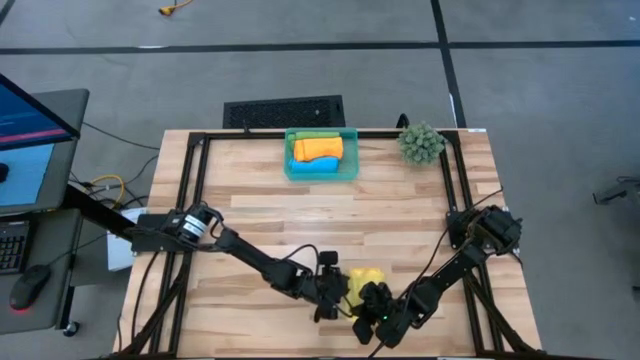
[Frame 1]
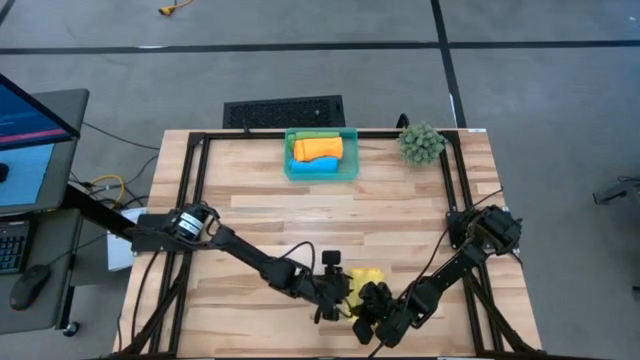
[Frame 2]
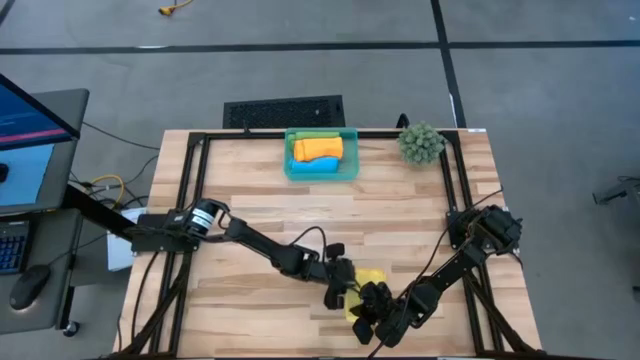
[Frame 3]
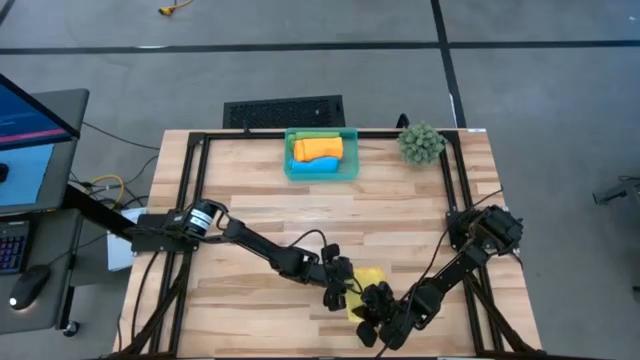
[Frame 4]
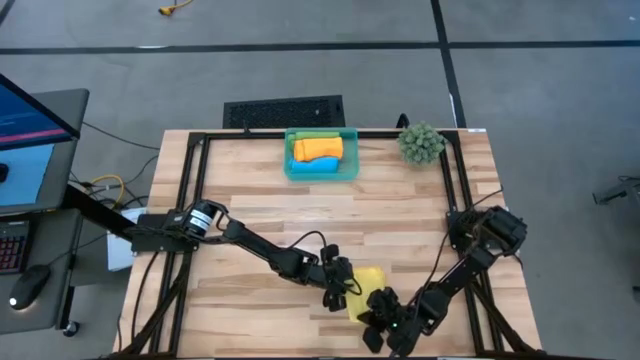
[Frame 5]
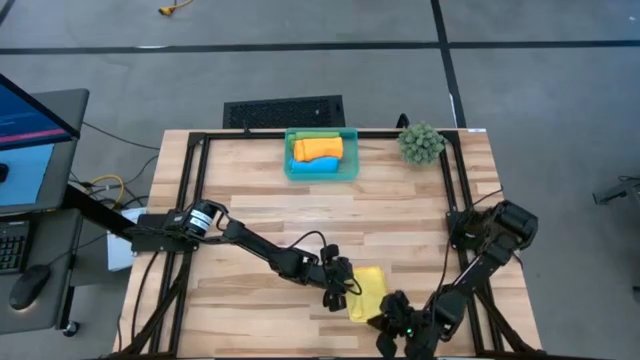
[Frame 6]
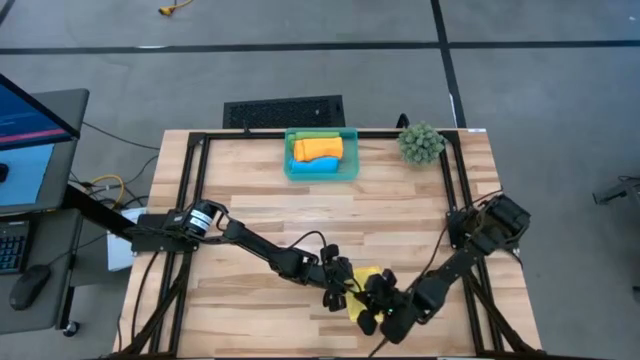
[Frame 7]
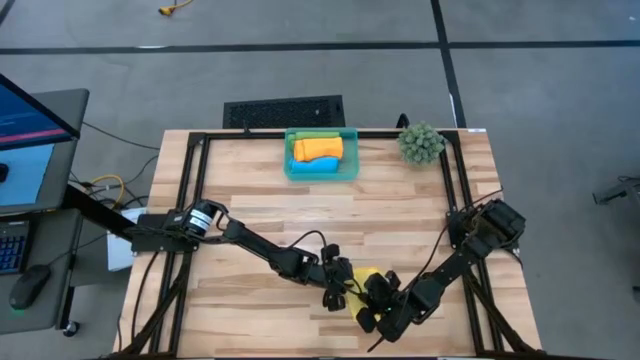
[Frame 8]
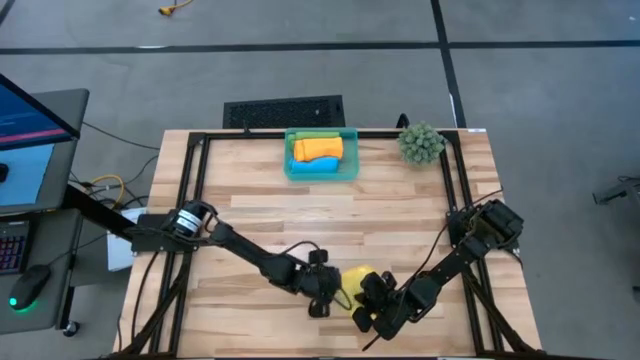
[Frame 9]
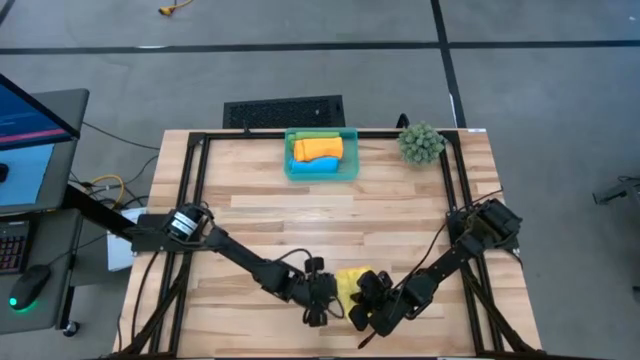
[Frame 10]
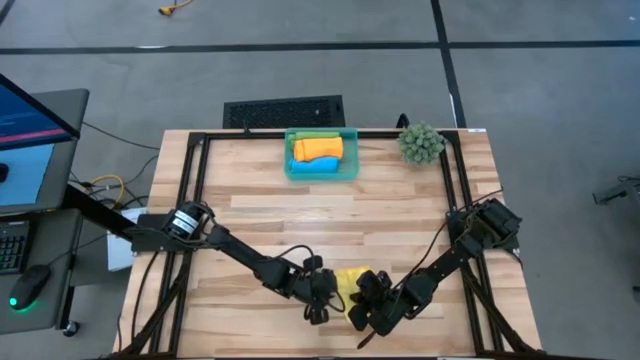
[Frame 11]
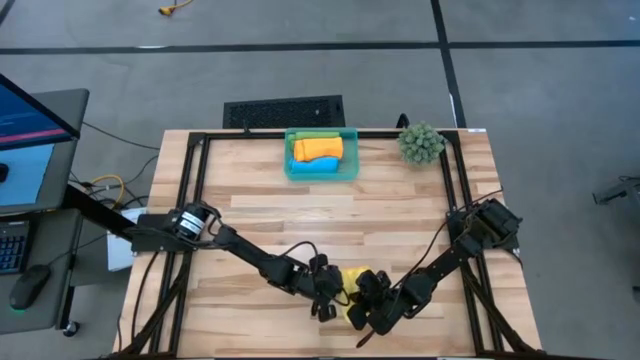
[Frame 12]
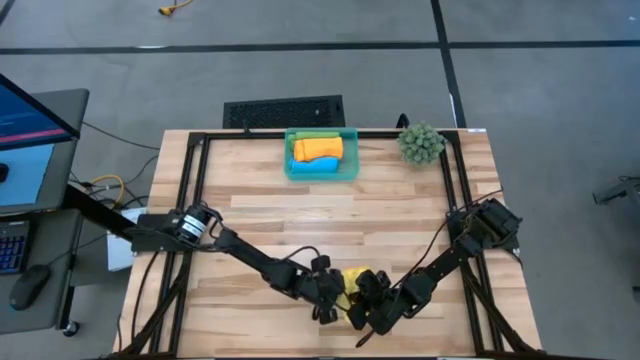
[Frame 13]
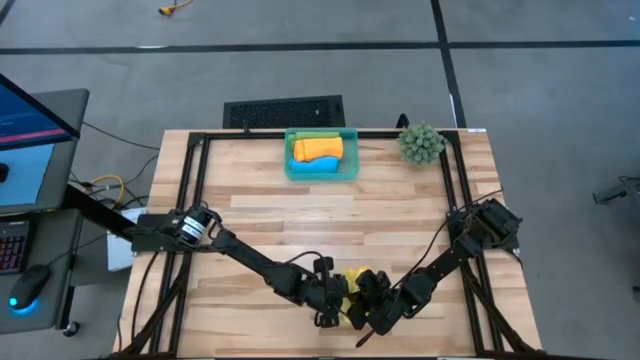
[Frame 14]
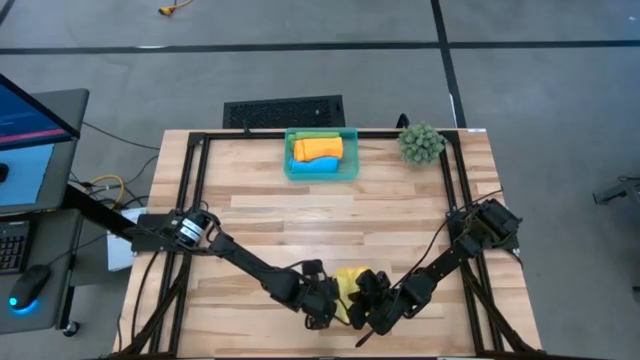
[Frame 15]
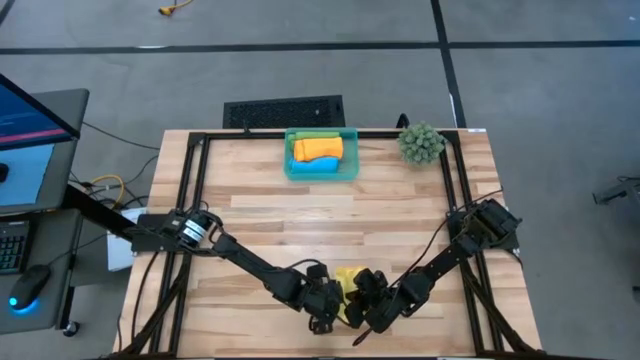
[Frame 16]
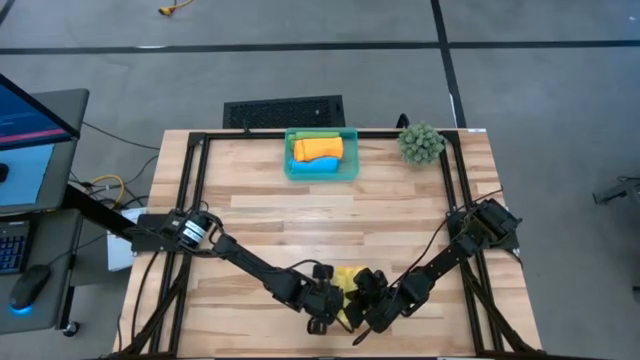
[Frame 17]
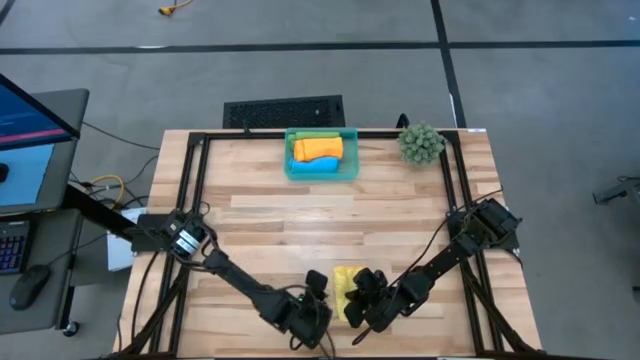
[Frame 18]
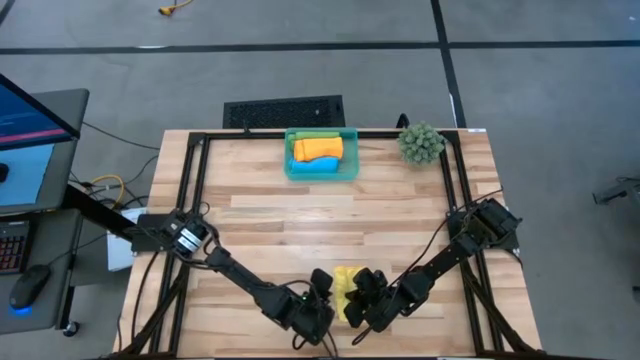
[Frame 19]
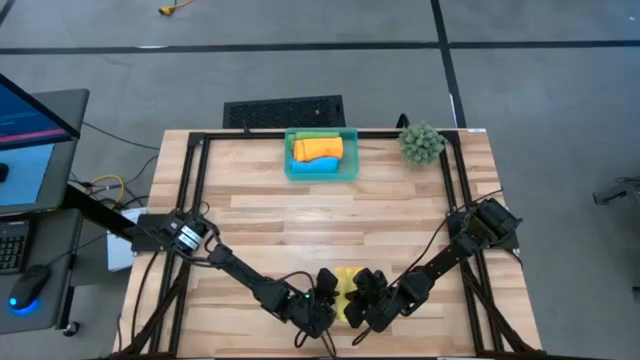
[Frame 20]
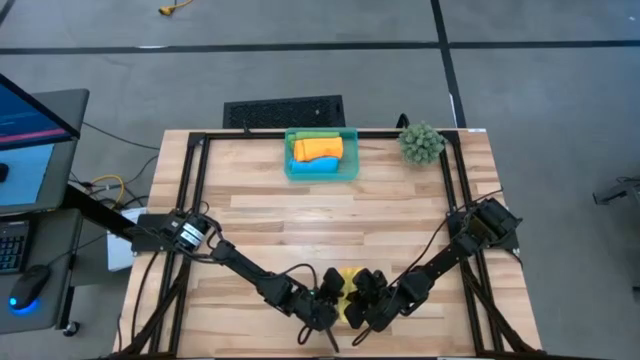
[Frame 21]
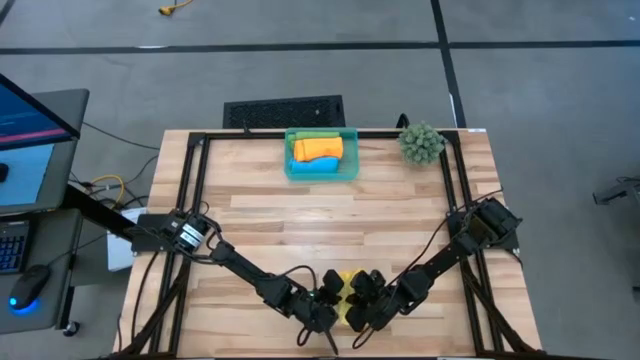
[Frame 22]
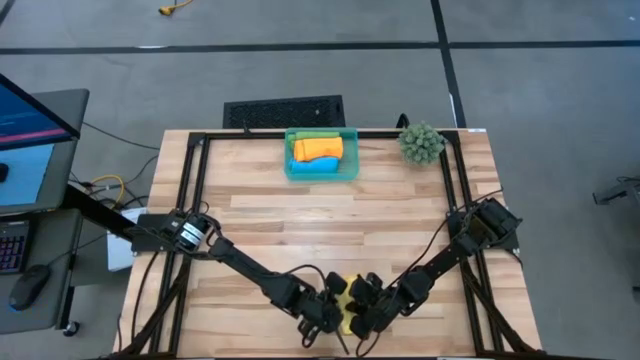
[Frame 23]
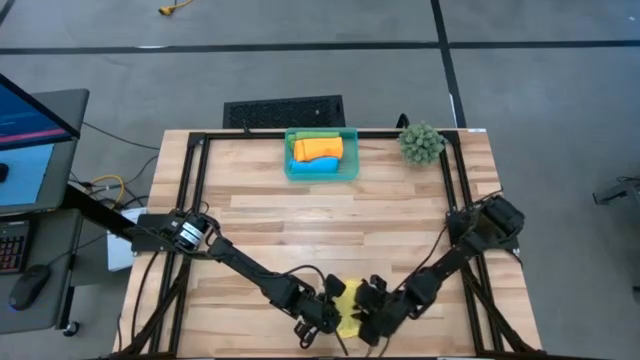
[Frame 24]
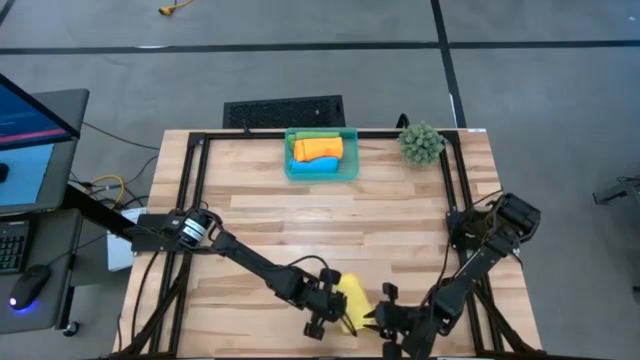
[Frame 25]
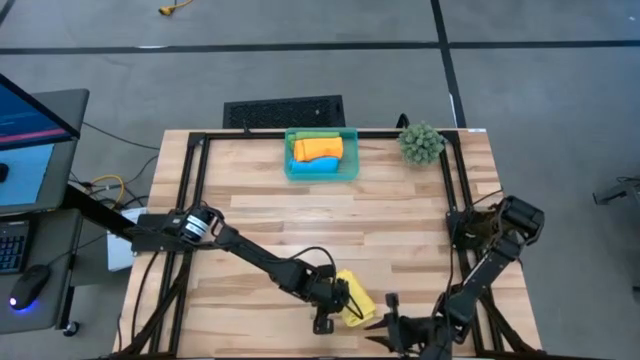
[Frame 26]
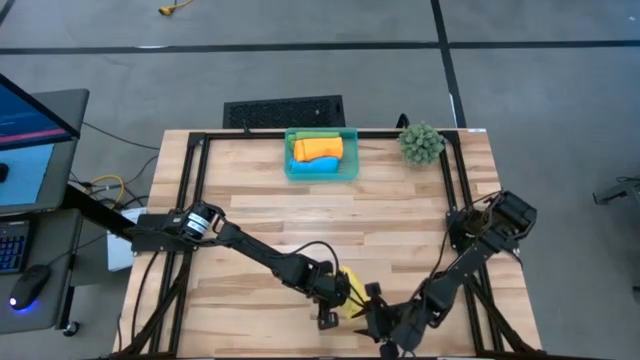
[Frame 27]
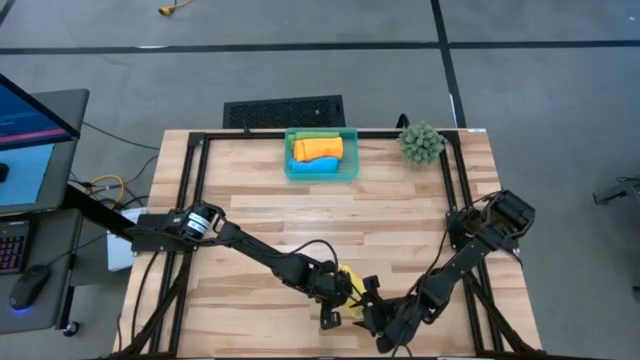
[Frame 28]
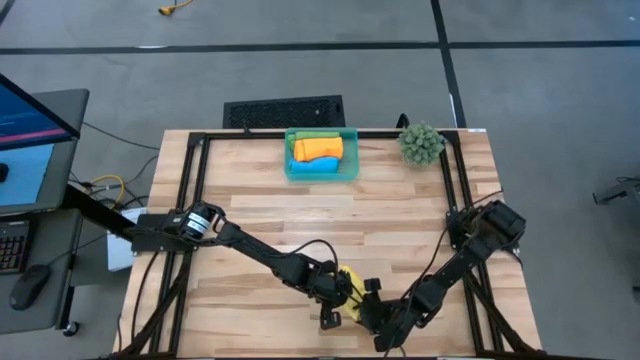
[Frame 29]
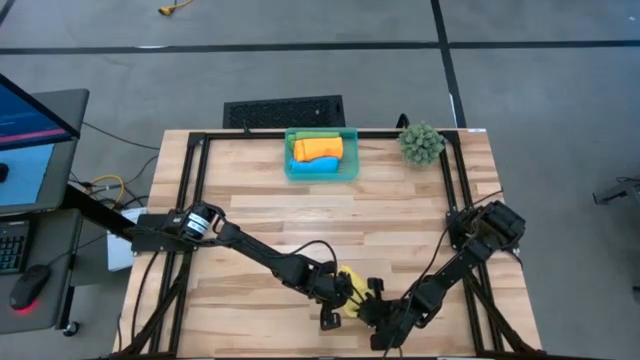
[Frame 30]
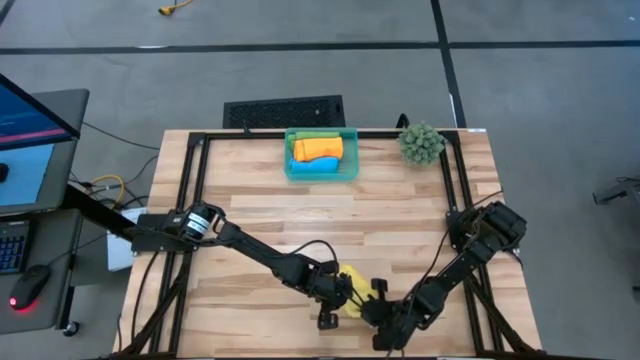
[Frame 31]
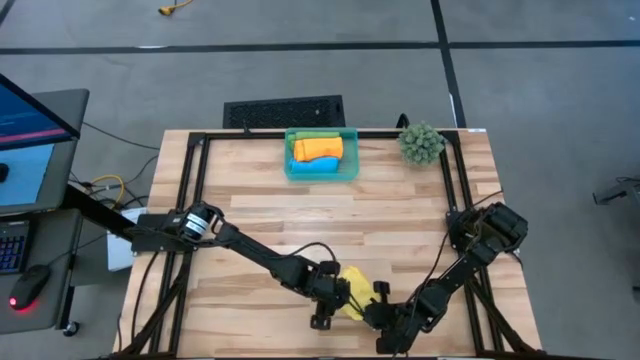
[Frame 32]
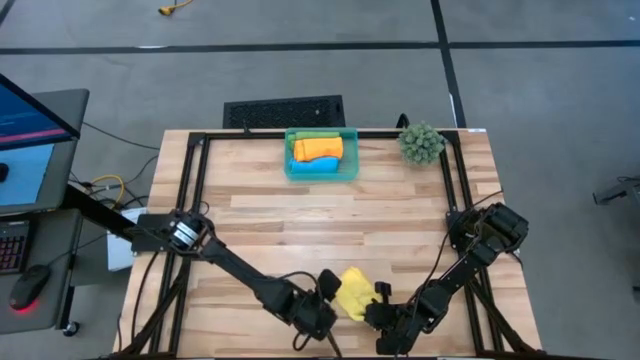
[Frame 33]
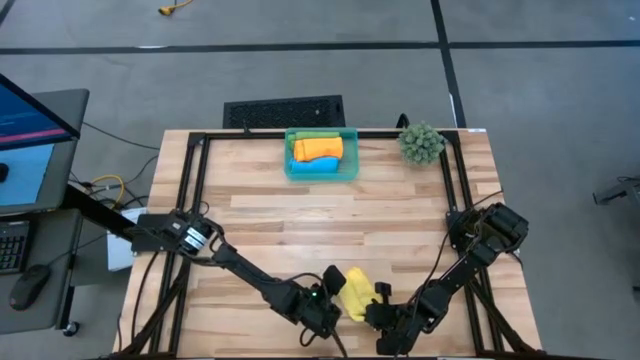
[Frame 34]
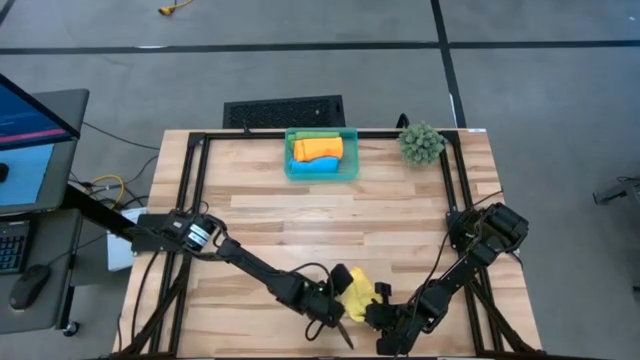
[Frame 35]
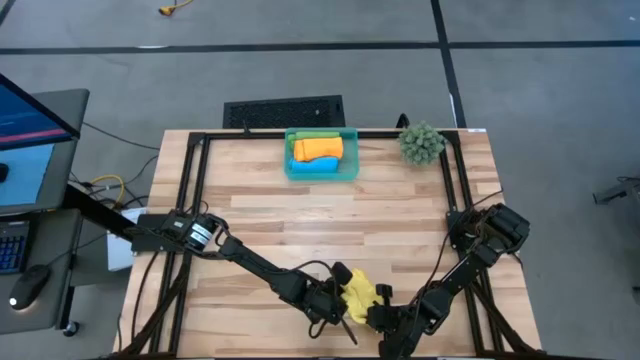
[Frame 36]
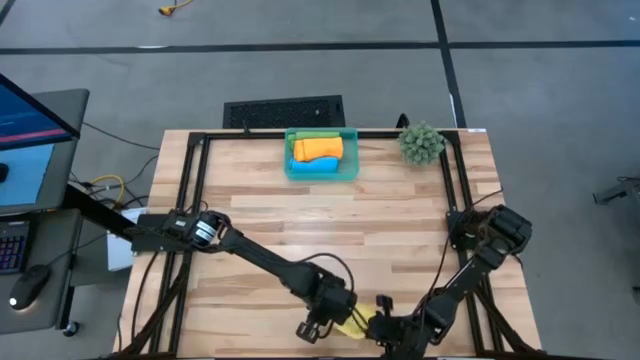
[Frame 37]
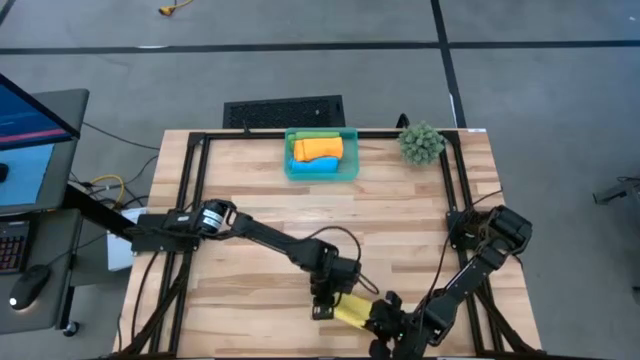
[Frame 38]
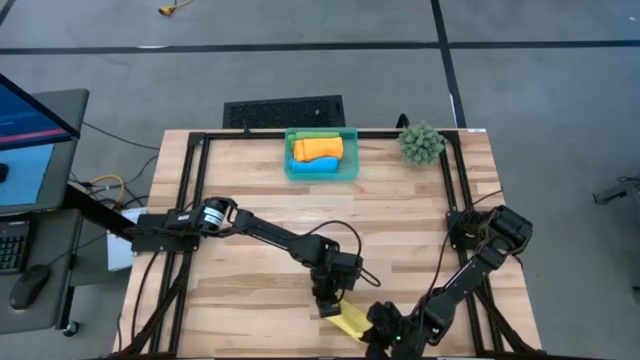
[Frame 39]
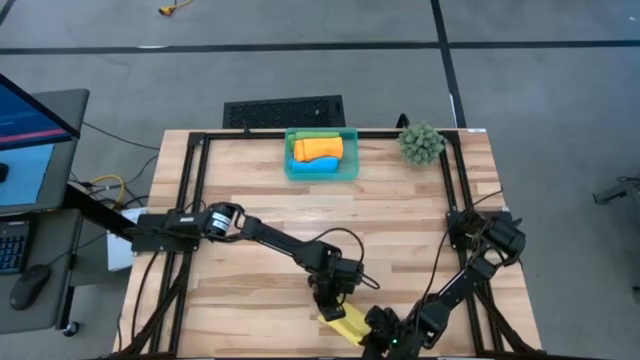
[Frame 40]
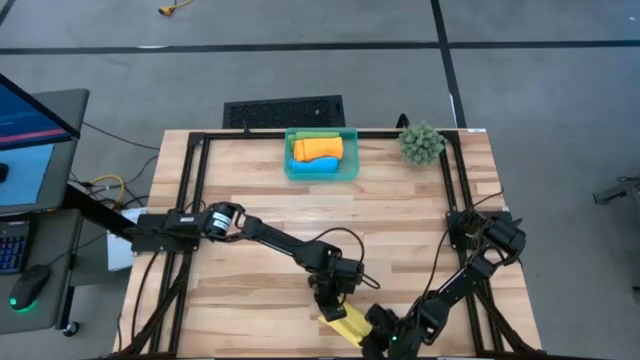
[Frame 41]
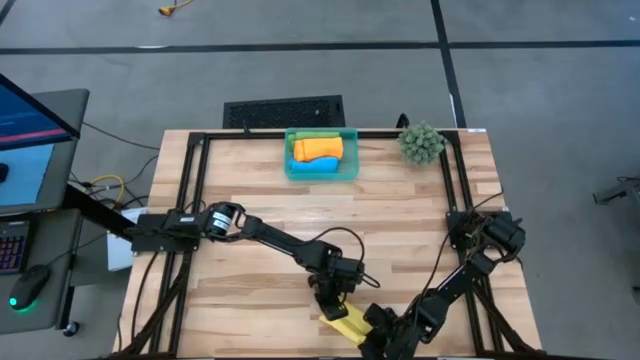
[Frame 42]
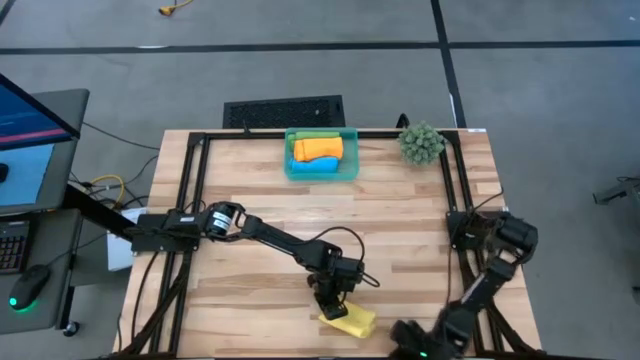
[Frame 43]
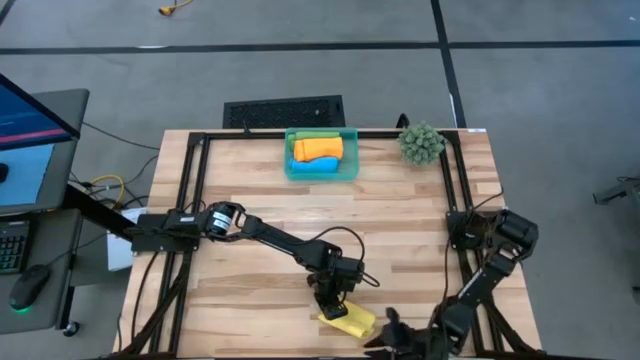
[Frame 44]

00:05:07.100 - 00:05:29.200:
Task: Roll microfiber towels into tight, uniform cylinder then place into a basket
Roll the yellow towel
